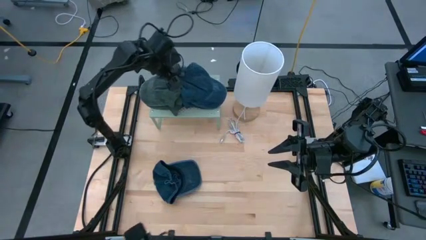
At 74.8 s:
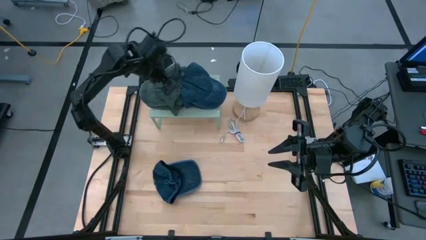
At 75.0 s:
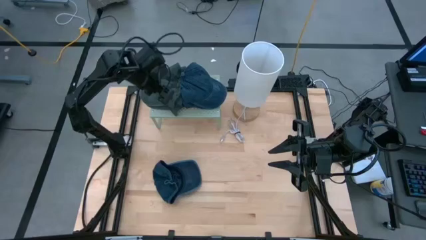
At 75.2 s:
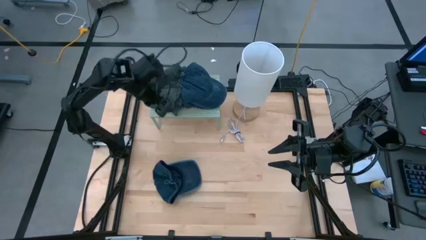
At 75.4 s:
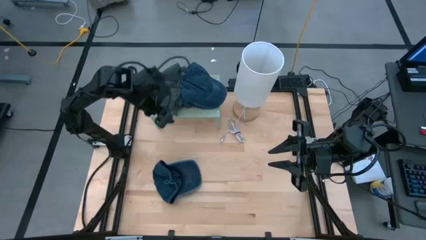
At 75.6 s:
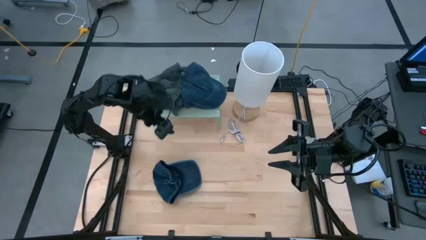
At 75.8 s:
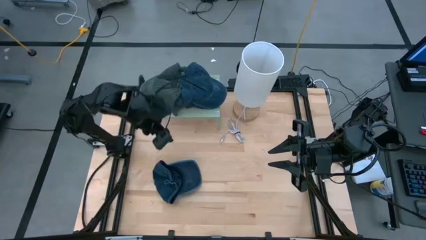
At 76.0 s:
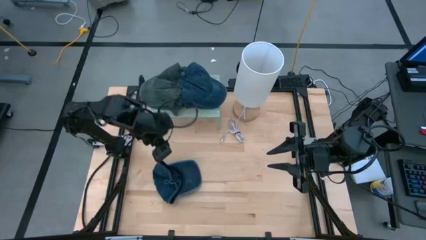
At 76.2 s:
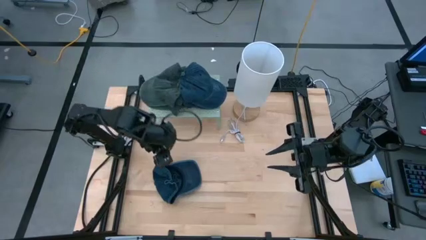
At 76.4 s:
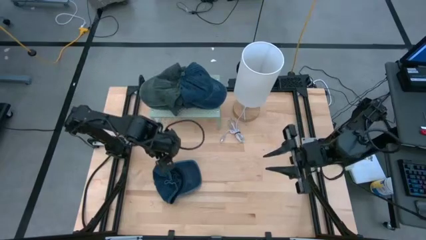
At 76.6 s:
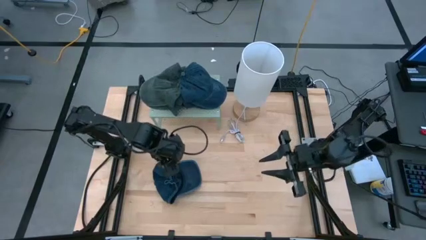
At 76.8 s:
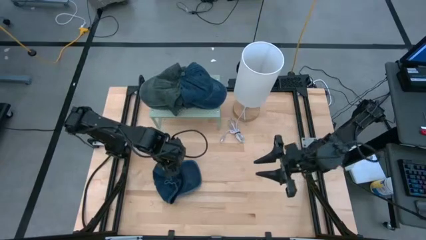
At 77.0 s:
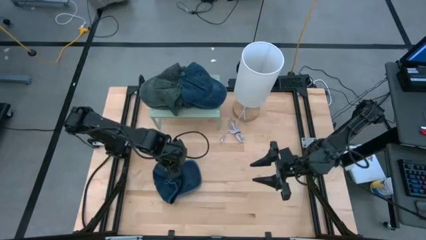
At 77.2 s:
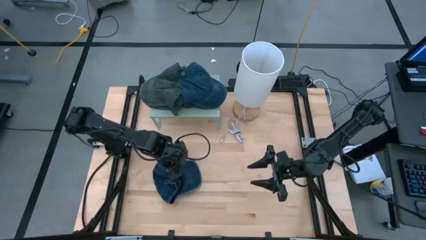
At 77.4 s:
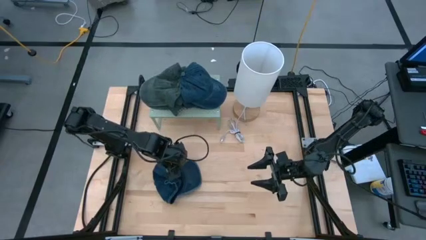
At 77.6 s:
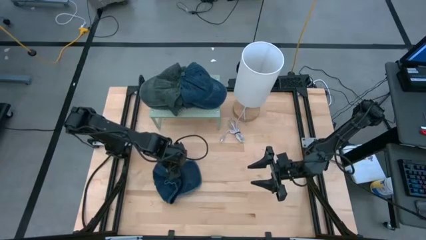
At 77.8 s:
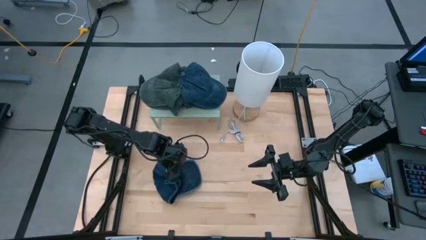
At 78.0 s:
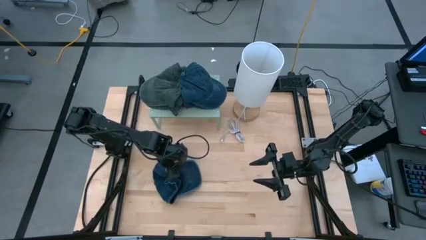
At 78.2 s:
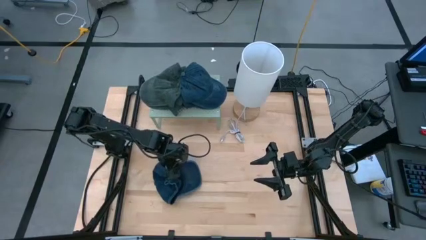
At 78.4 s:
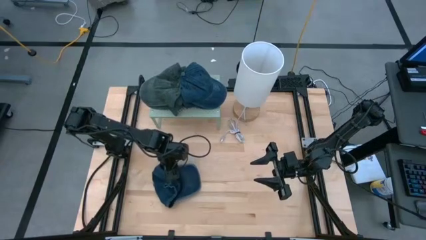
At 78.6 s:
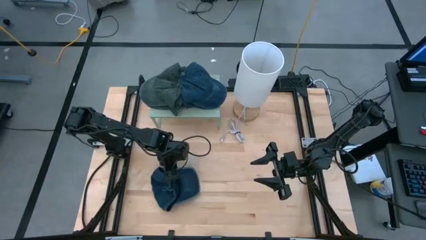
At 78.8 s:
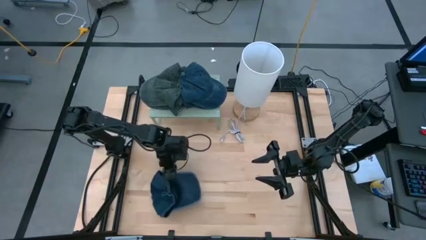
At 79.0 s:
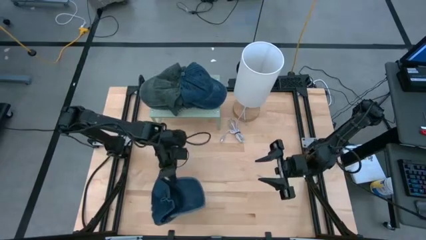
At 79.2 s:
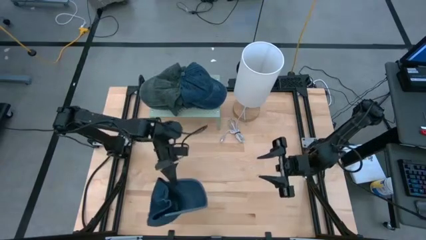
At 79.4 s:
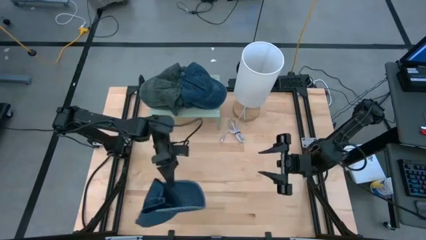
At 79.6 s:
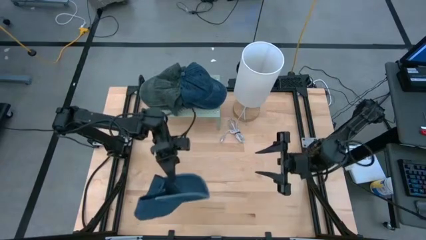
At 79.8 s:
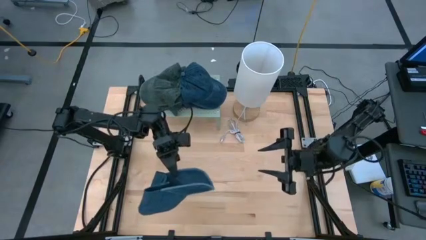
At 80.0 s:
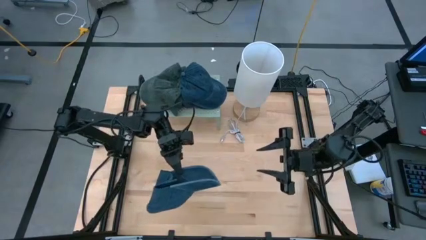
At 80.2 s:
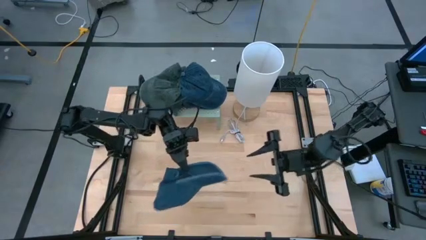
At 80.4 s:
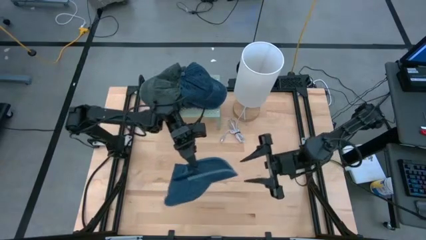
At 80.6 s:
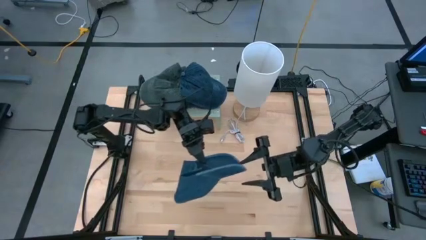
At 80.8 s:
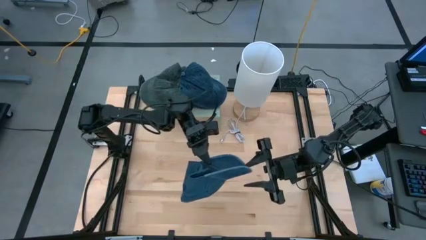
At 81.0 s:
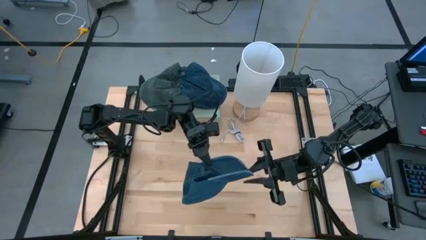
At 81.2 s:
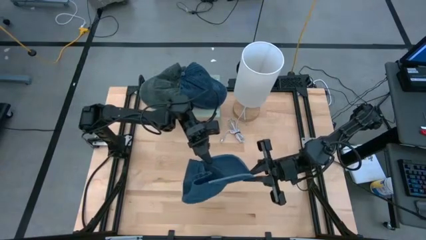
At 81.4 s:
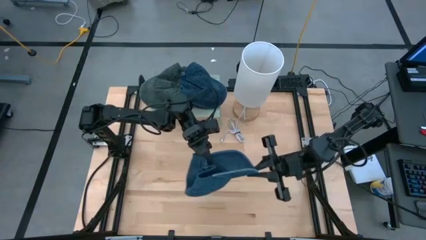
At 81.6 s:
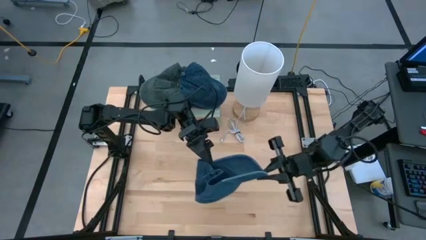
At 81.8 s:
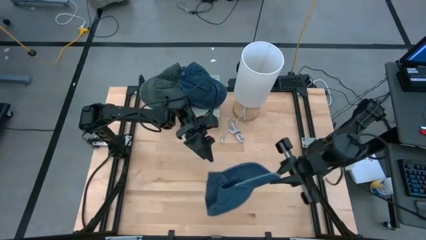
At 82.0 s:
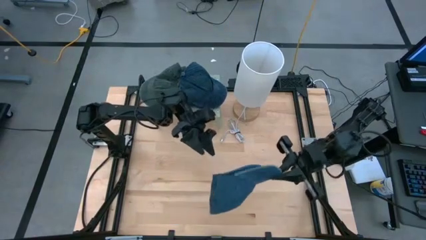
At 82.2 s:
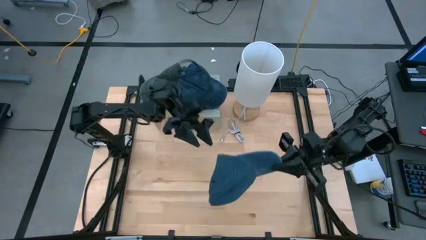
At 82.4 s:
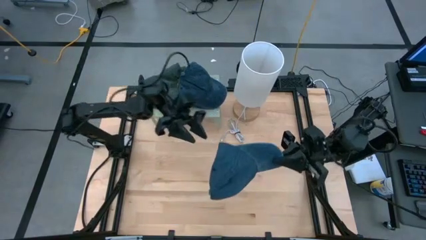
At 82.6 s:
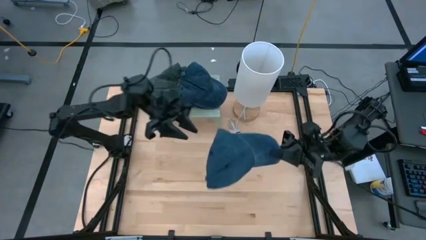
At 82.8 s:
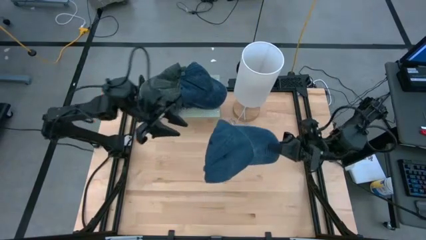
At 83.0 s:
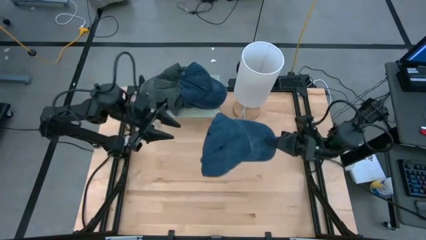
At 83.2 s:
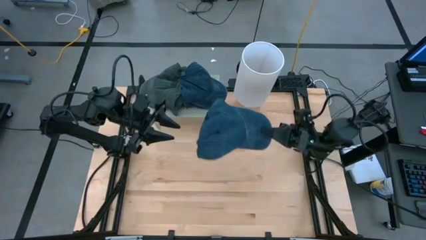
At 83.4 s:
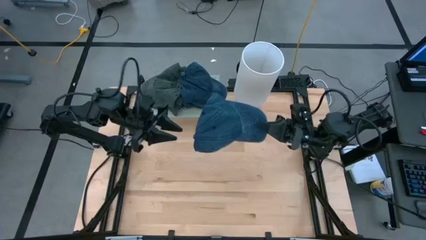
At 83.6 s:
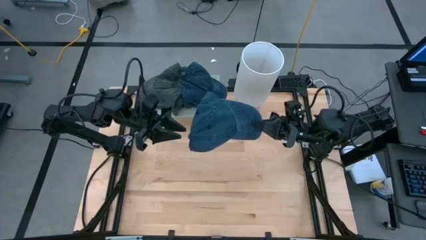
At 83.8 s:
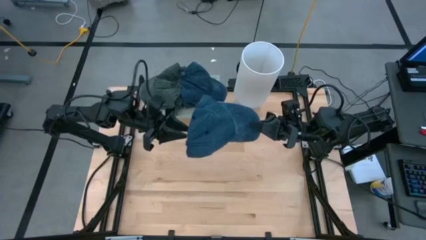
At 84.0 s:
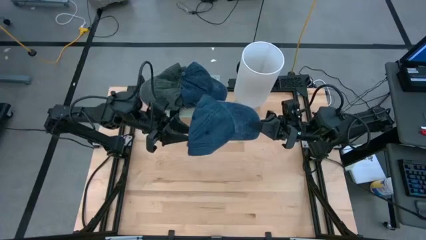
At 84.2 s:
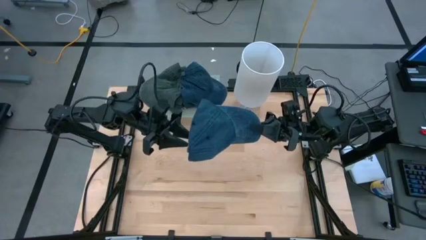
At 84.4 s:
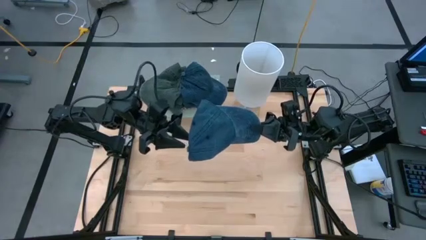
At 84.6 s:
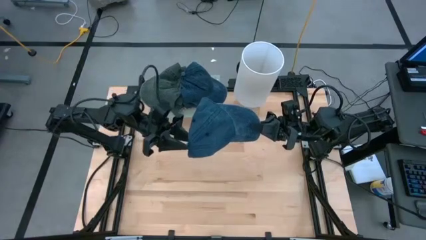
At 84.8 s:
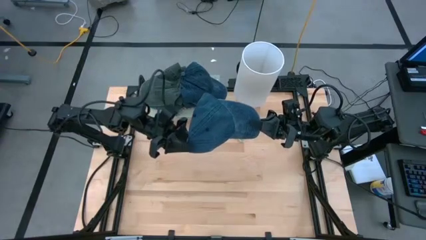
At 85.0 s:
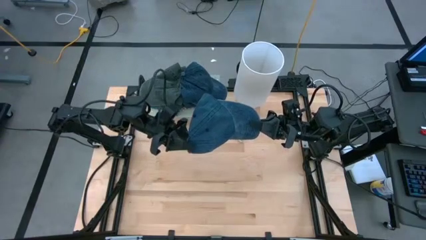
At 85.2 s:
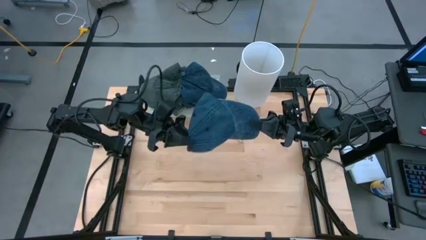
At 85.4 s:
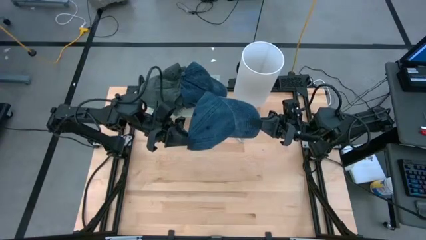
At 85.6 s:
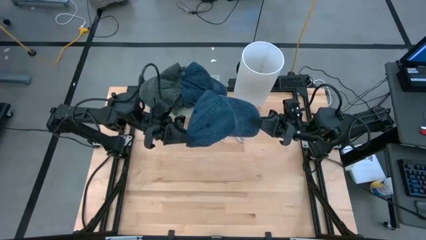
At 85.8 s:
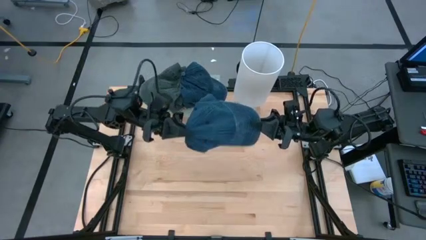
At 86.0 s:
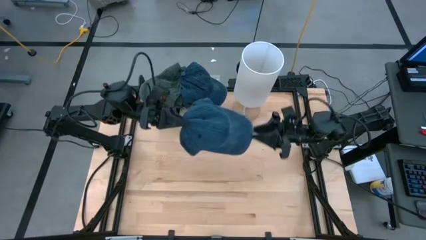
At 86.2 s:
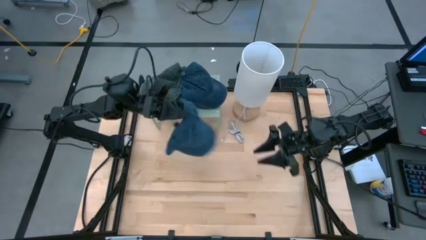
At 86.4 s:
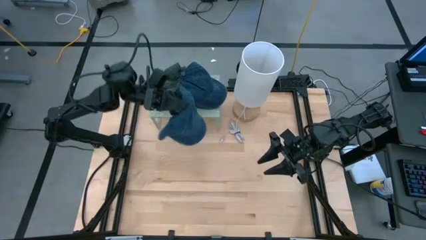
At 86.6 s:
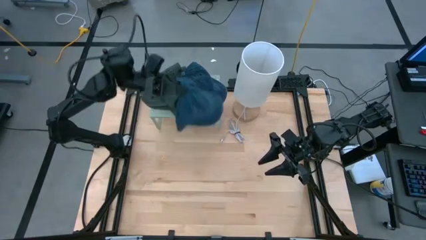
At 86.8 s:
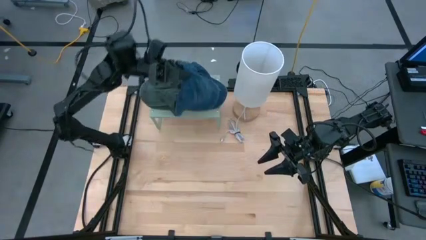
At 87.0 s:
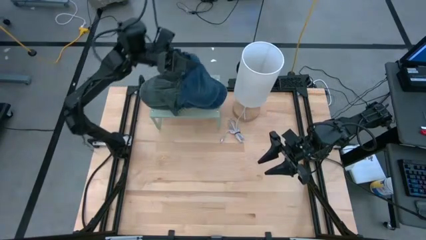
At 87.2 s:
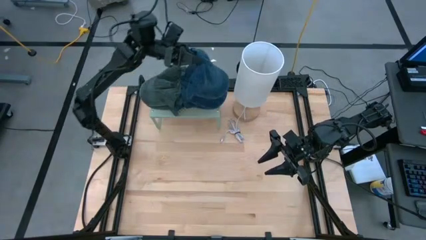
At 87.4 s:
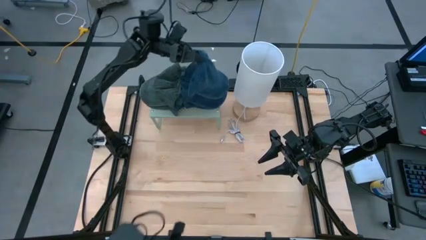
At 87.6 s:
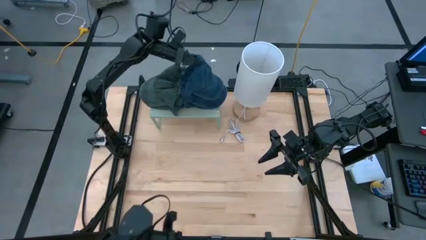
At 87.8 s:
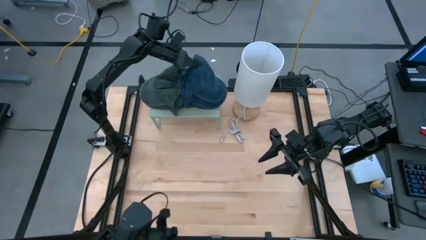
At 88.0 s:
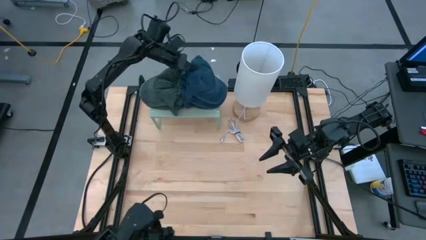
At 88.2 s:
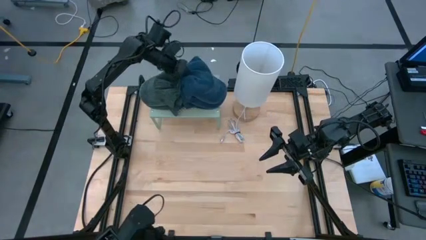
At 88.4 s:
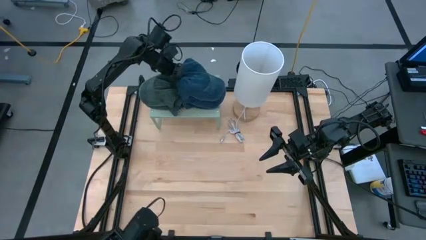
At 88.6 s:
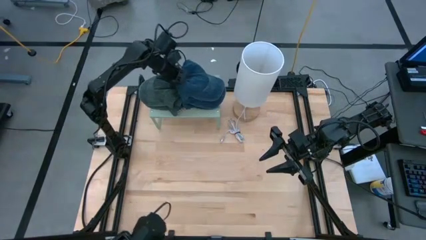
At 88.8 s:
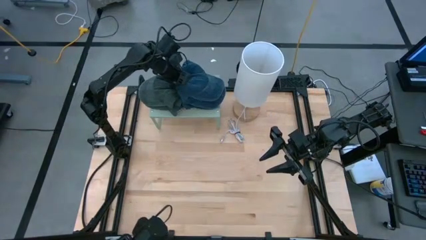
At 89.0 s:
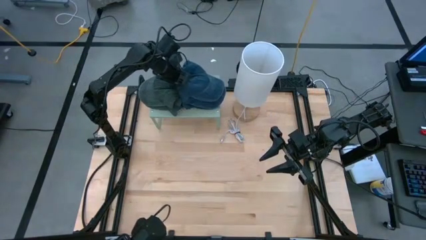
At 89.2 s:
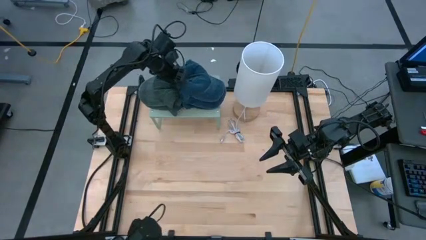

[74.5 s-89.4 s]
Task: Pick & Place hat
Stack the blue cap on top of the stacked blue caps on the shelf
